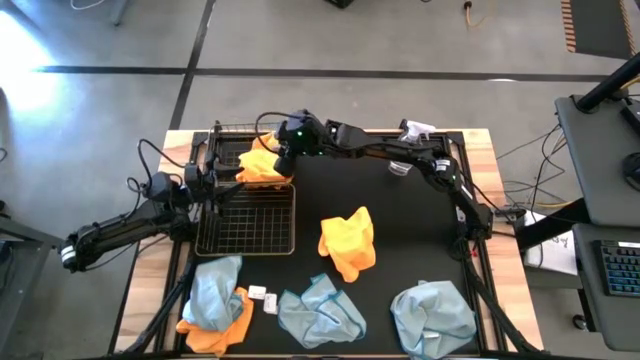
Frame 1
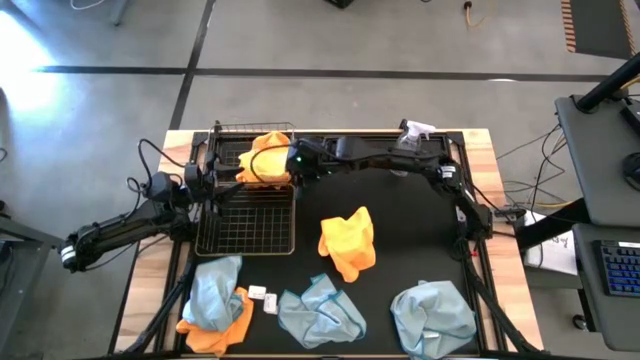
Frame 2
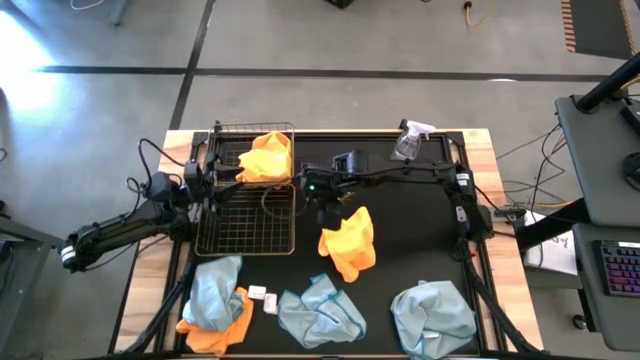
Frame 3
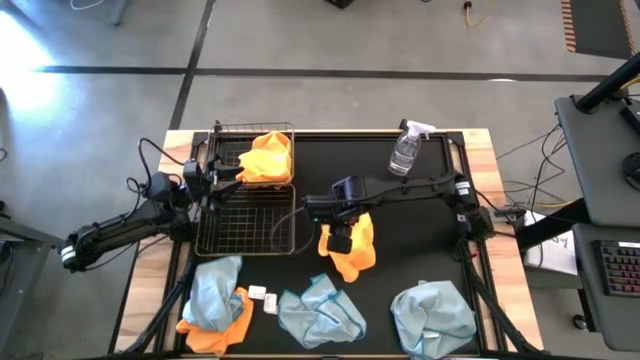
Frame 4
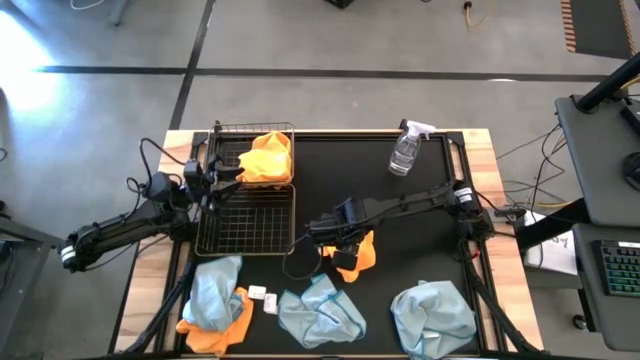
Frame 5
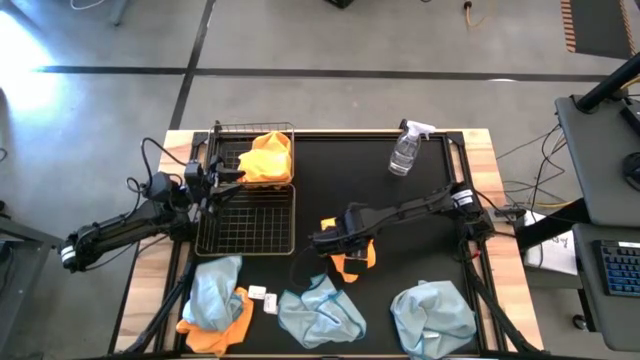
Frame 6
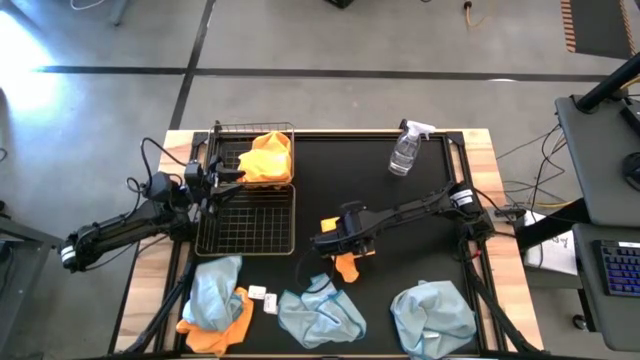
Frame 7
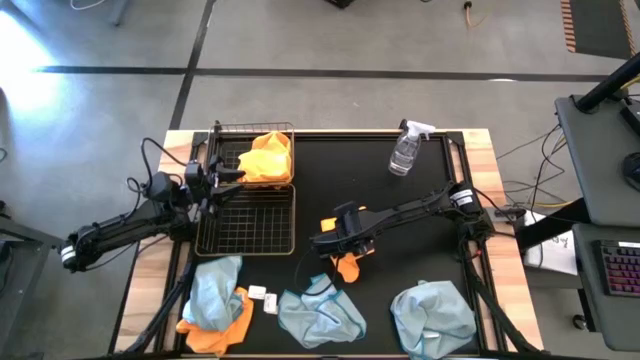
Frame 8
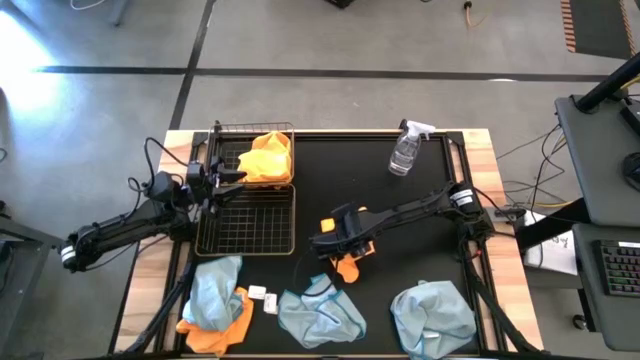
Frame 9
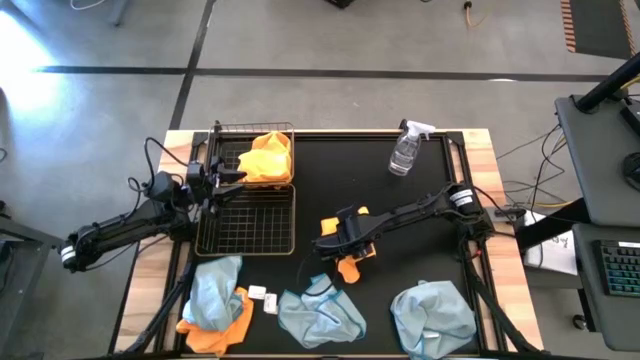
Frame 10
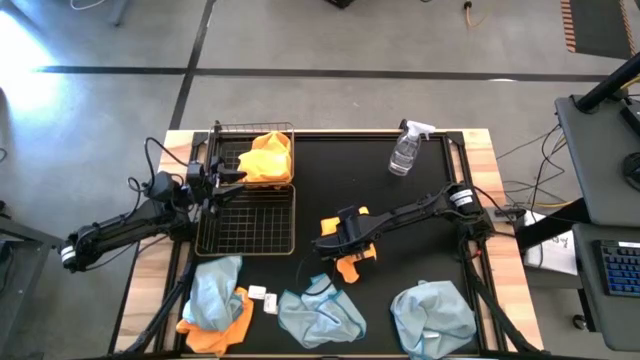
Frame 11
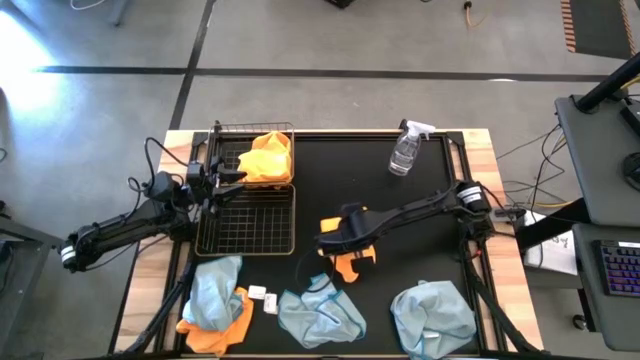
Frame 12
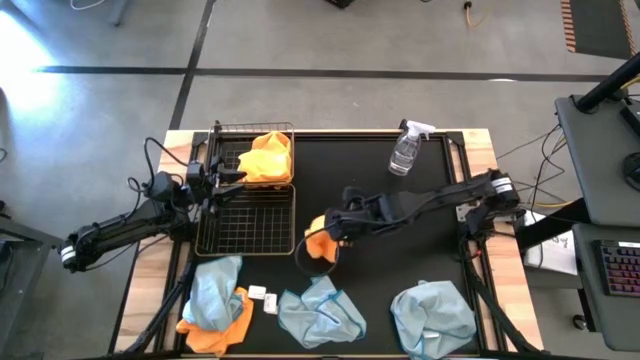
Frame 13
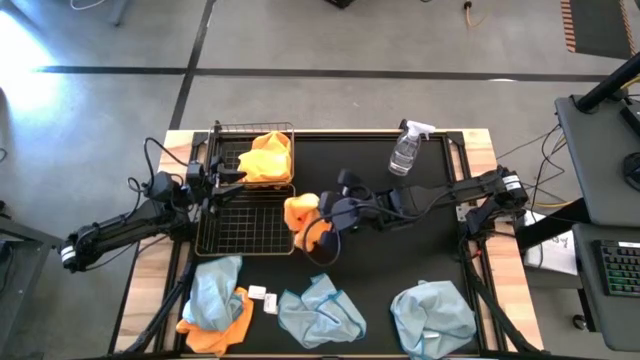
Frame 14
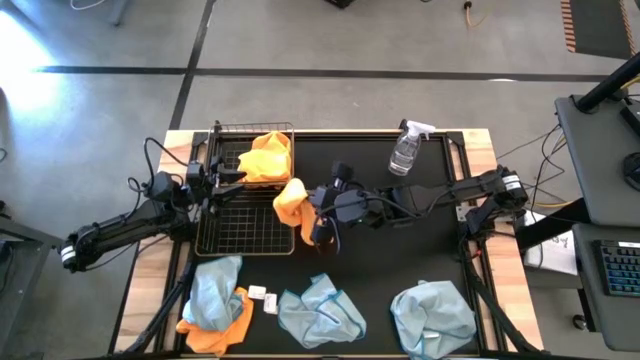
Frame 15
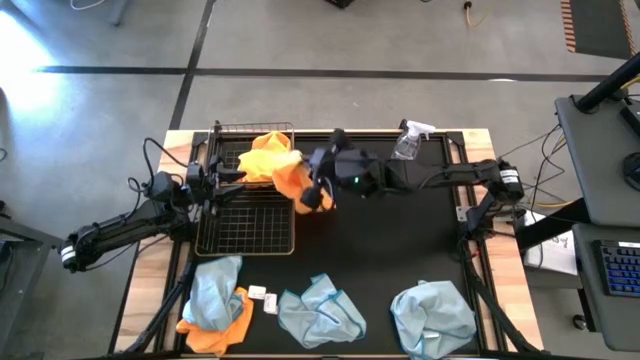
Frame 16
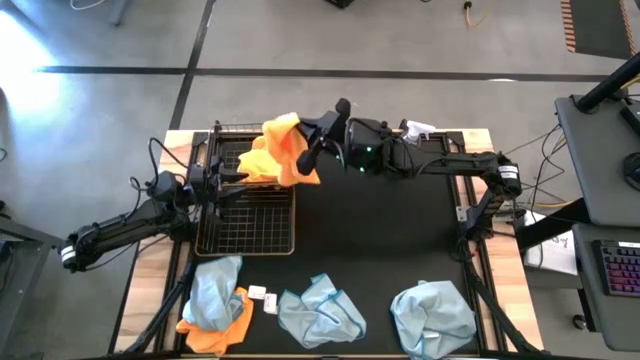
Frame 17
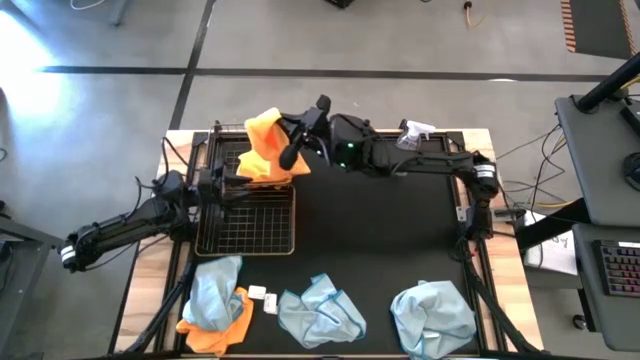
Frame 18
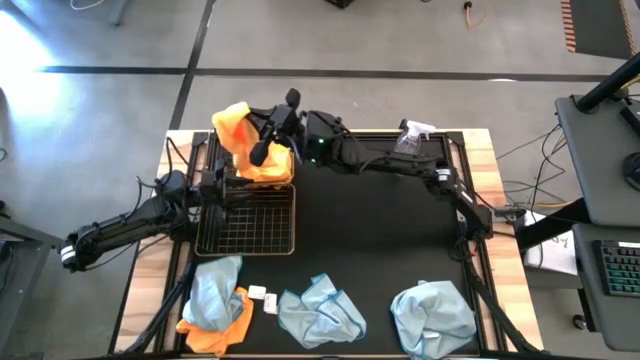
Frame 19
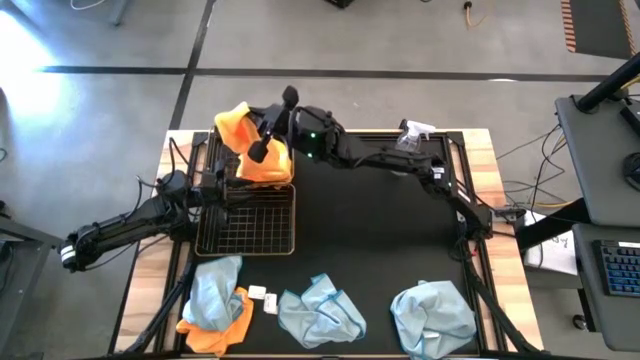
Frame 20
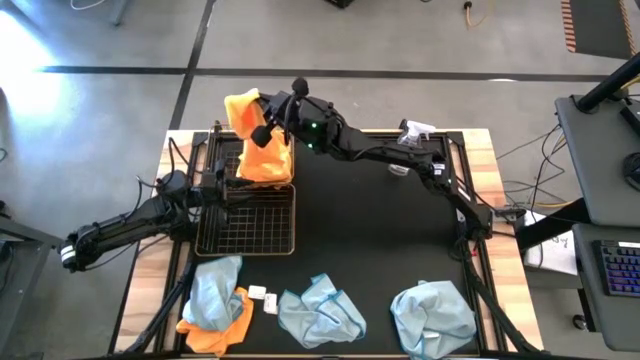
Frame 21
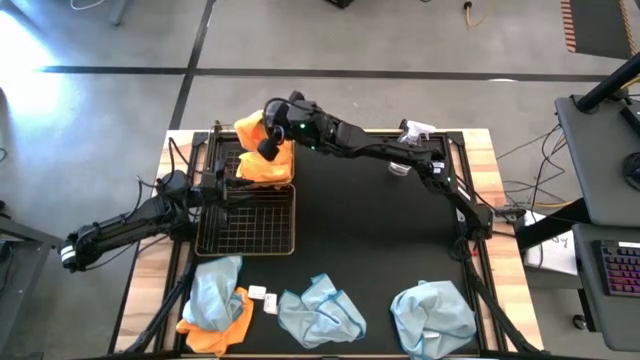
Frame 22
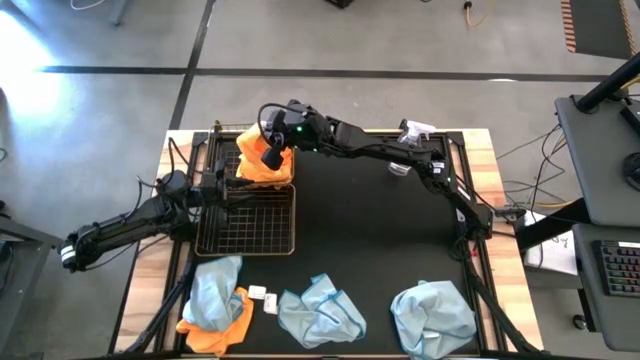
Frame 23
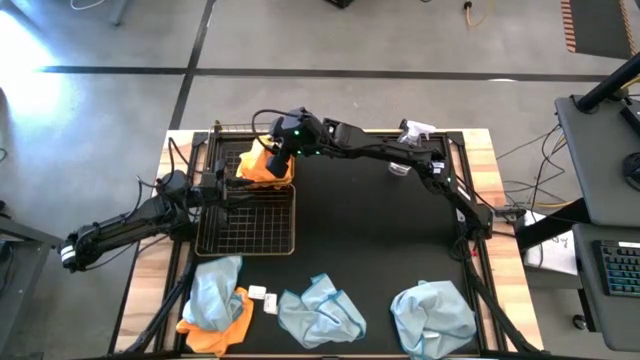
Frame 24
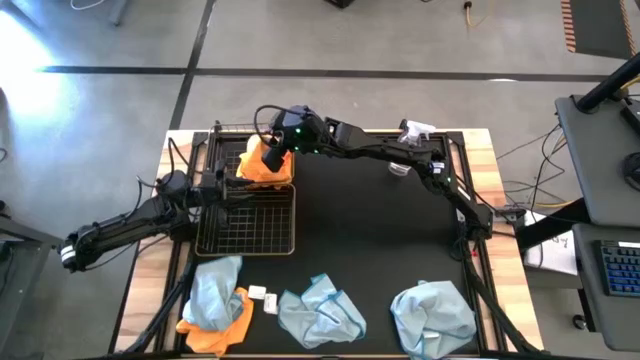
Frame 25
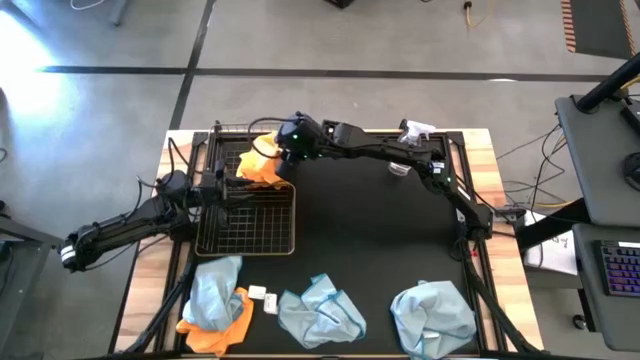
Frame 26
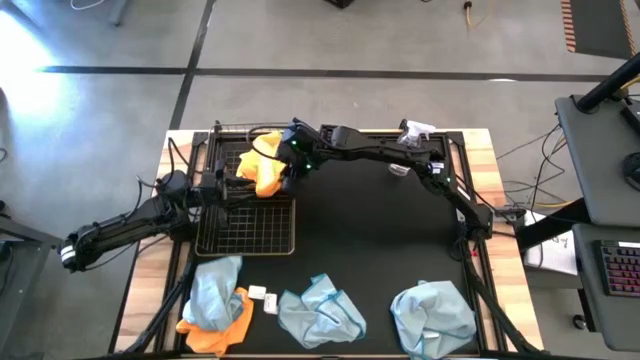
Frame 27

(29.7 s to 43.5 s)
Task: Sort microfiber towel by color & place in baskets
Put the right orange microfiber towel into the top wire basket

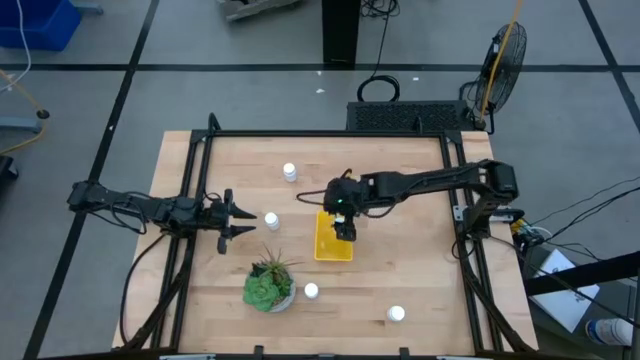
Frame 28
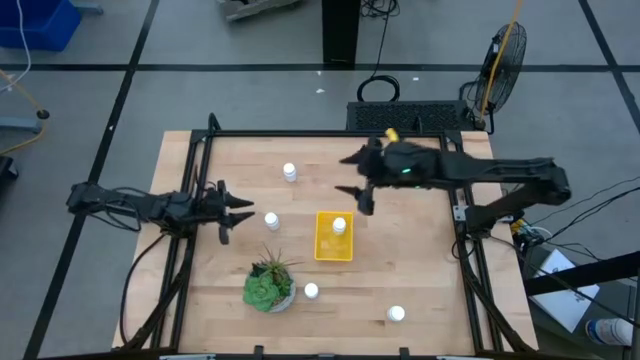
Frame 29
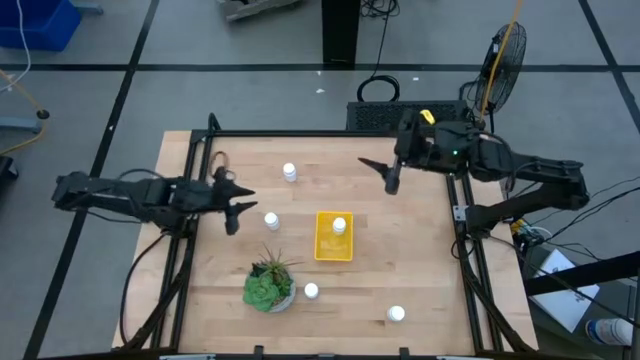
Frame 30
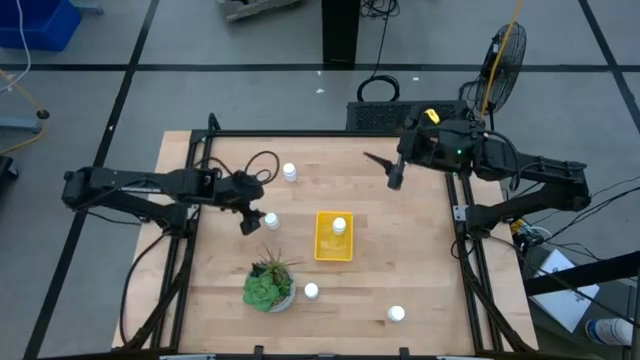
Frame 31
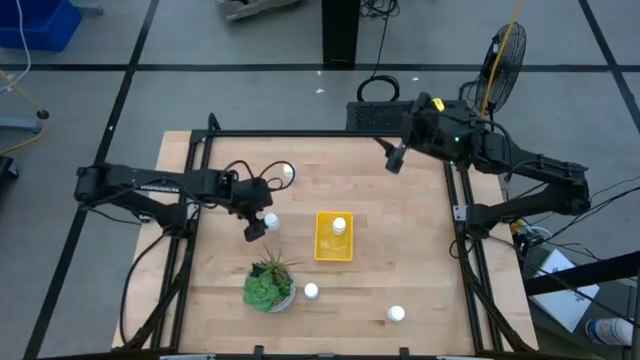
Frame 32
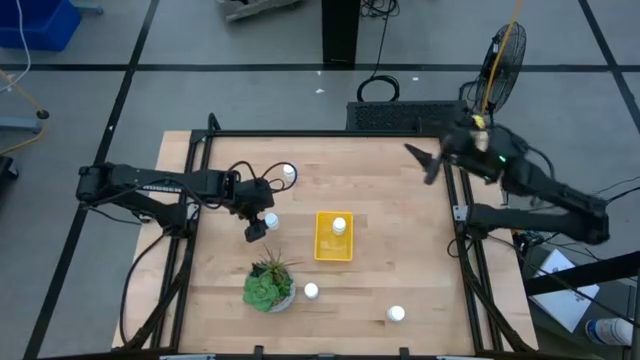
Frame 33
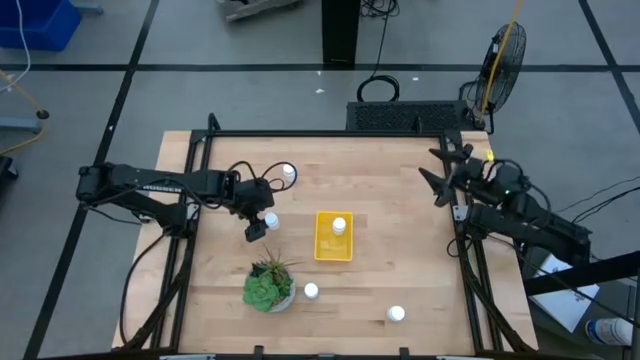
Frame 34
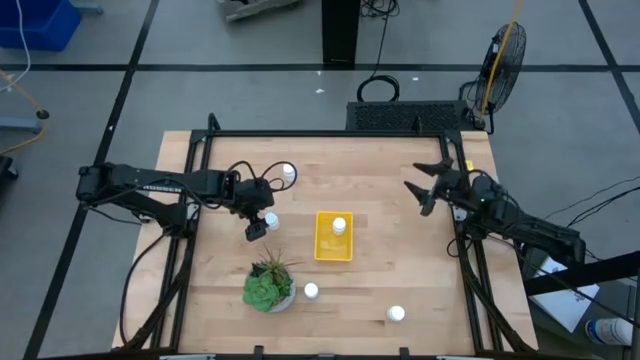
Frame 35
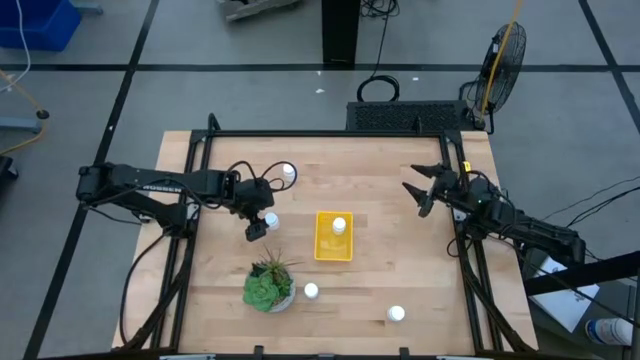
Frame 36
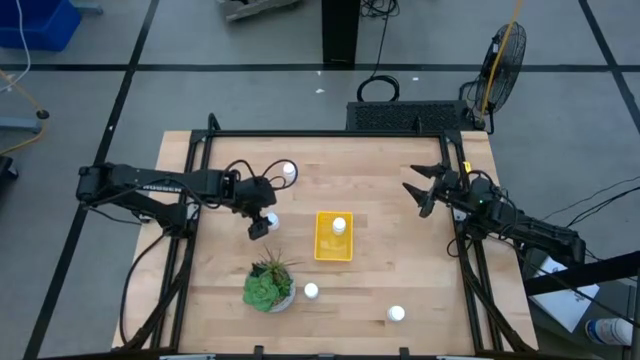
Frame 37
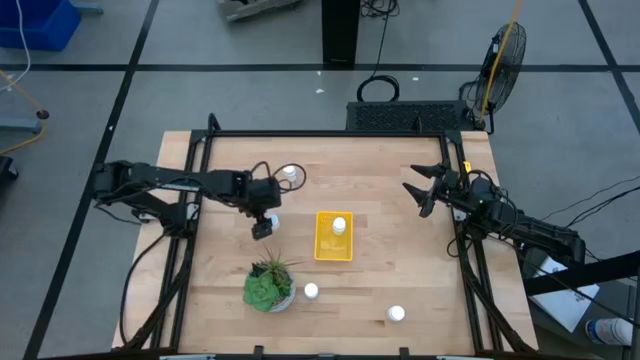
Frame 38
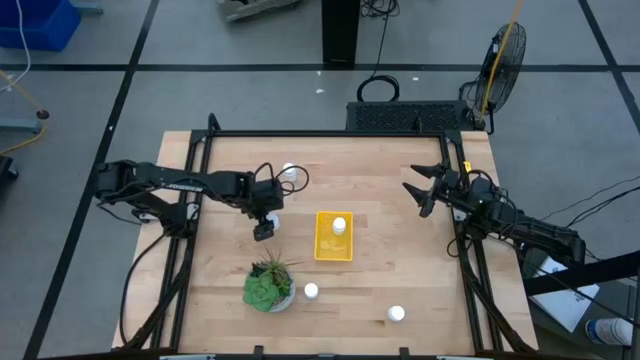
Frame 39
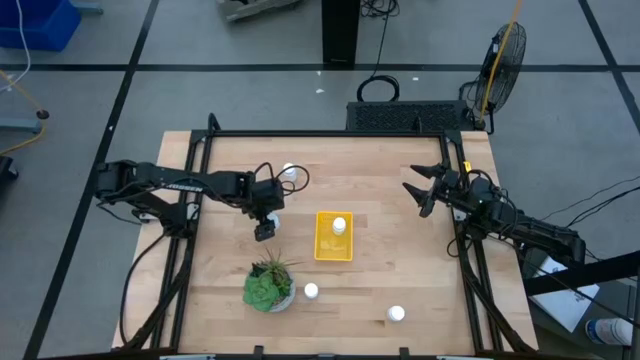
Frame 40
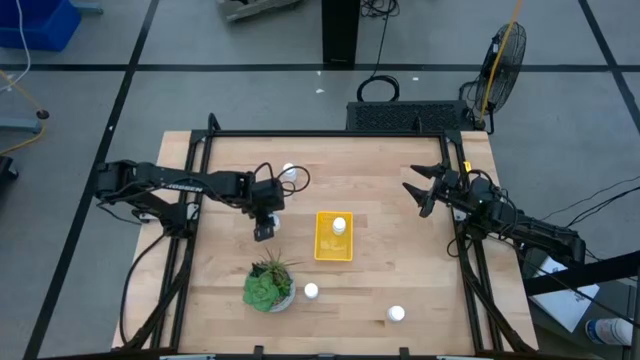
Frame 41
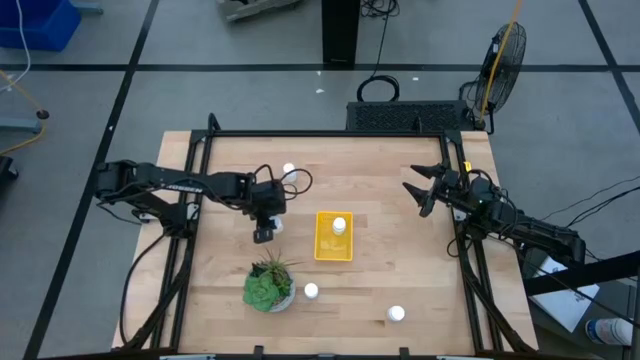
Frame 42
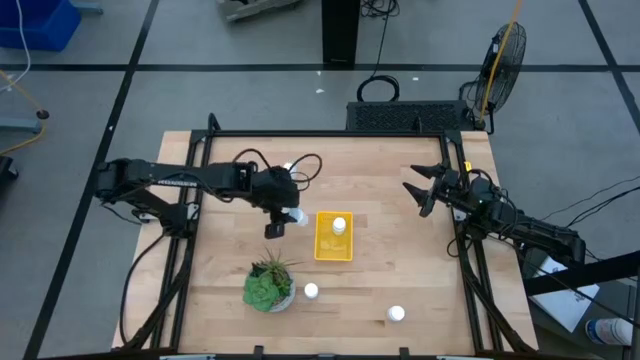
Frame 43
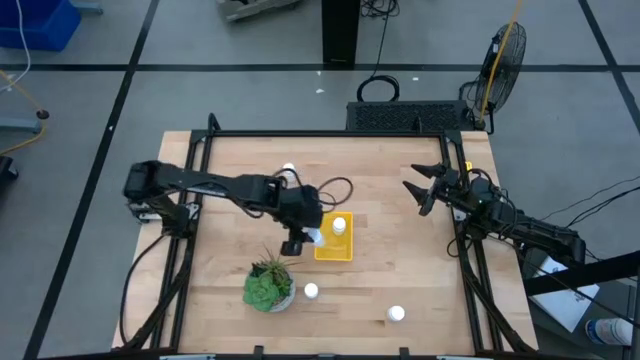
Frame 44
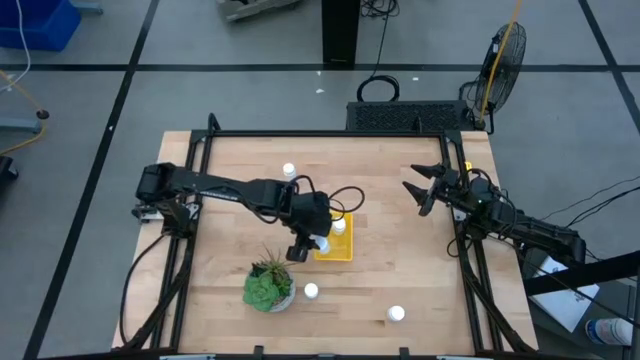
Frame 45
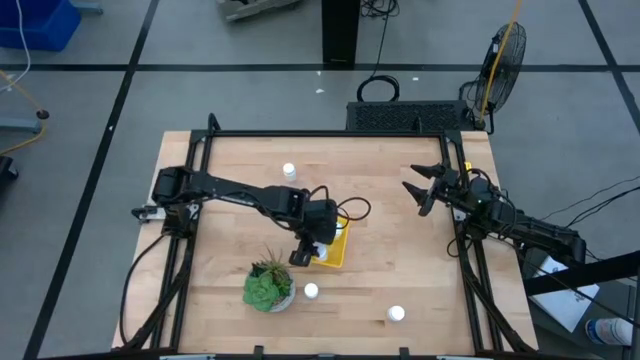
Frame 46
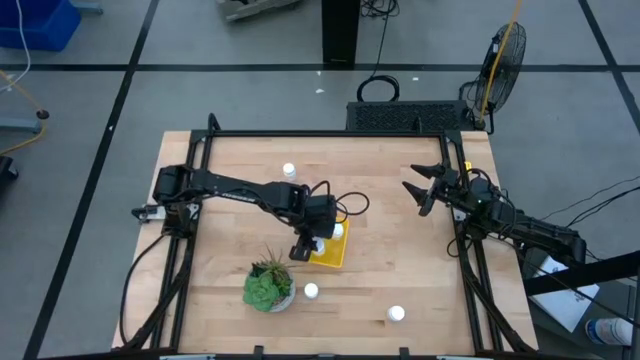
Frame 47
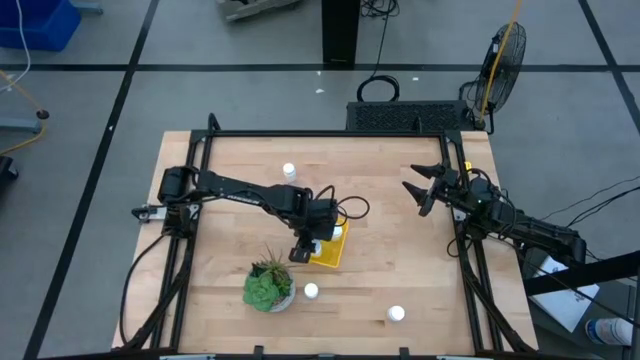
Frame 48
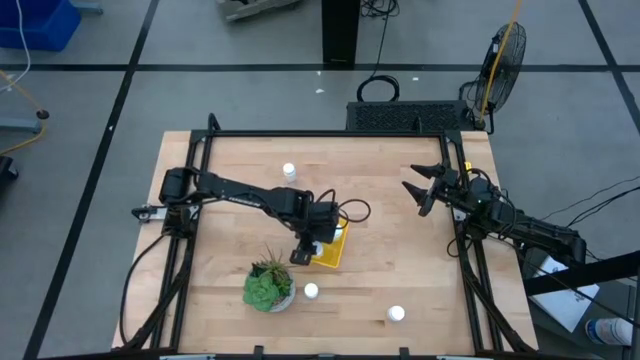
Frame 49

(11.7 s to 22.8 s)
Task: Pick and place pill bottles into a basket
Put the white pill bottle into the yellow bin
